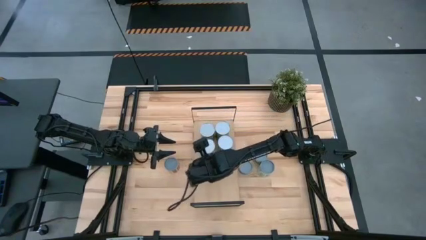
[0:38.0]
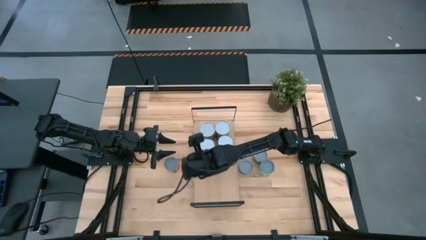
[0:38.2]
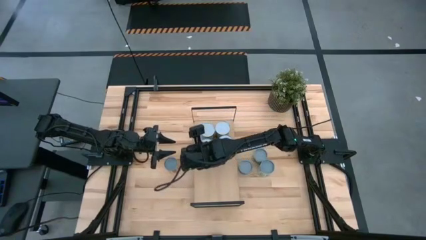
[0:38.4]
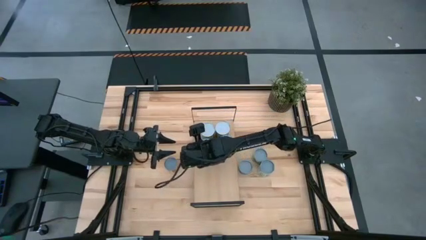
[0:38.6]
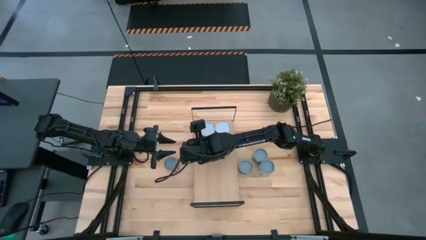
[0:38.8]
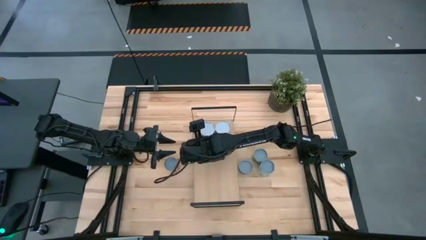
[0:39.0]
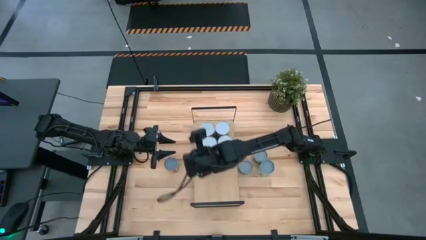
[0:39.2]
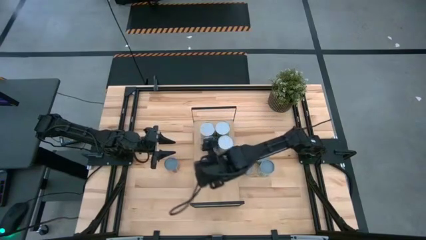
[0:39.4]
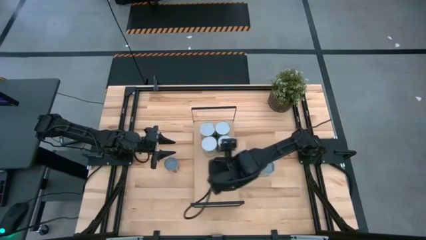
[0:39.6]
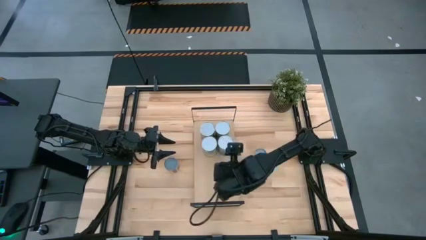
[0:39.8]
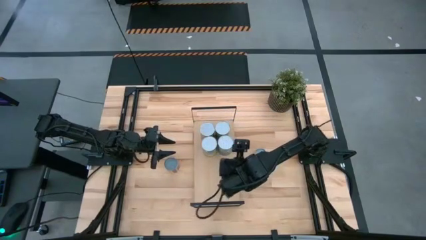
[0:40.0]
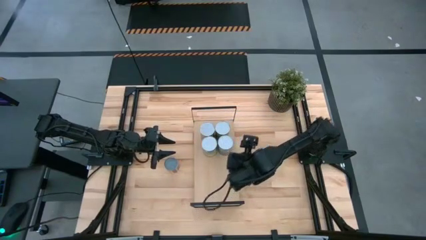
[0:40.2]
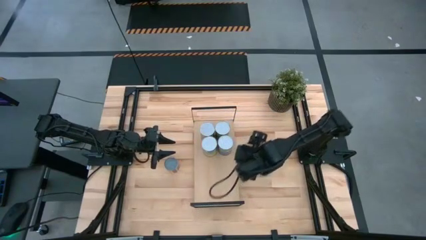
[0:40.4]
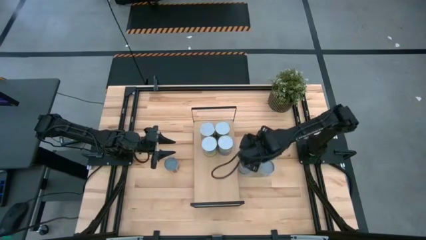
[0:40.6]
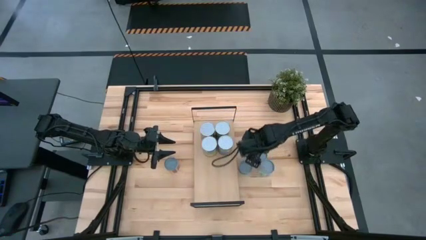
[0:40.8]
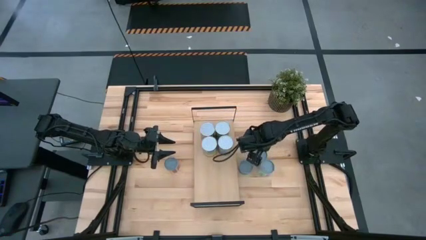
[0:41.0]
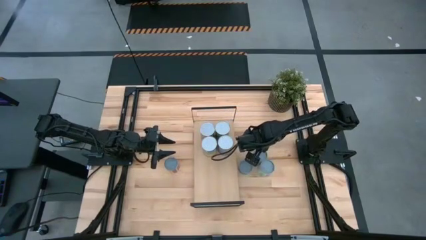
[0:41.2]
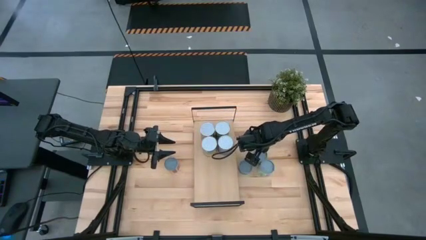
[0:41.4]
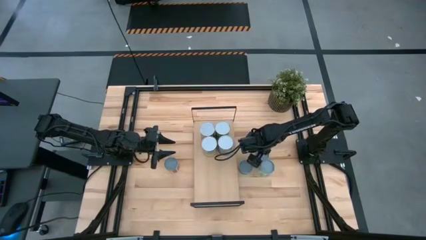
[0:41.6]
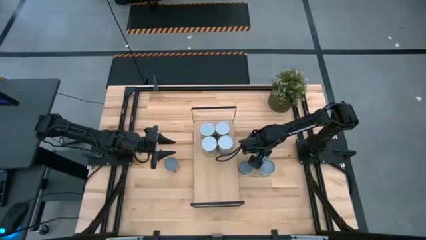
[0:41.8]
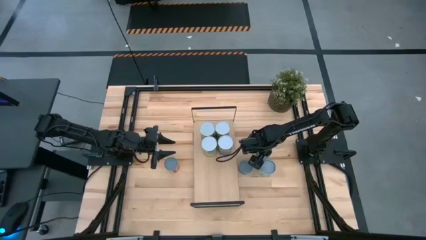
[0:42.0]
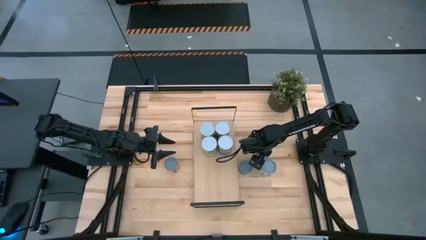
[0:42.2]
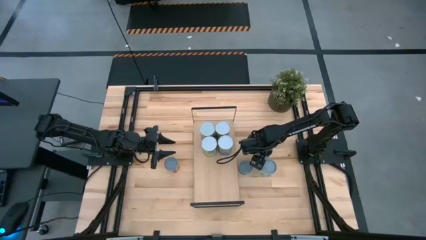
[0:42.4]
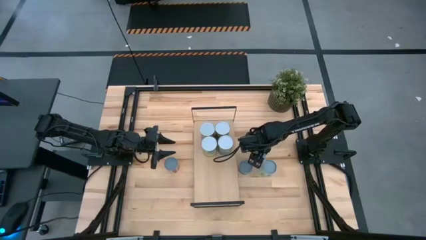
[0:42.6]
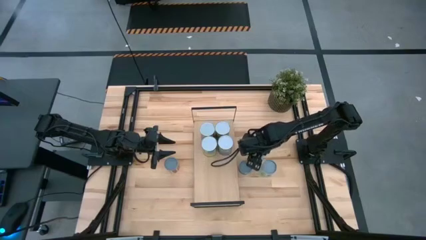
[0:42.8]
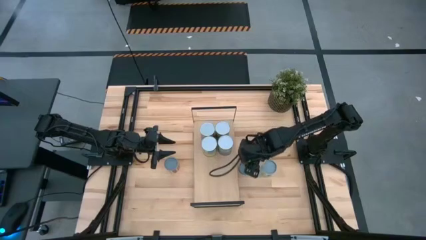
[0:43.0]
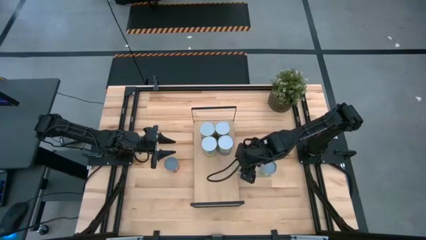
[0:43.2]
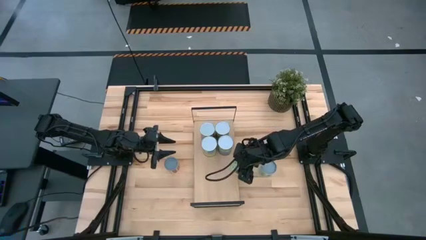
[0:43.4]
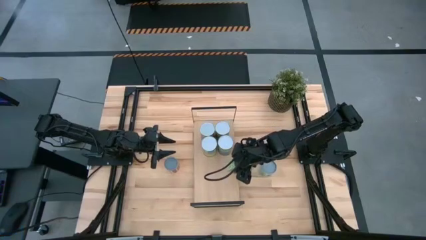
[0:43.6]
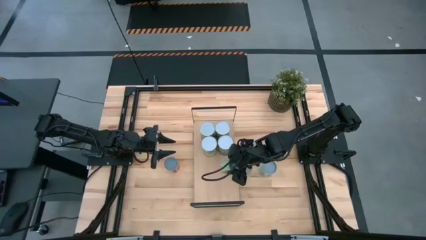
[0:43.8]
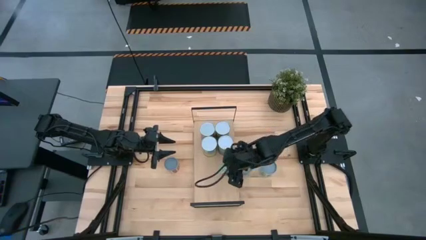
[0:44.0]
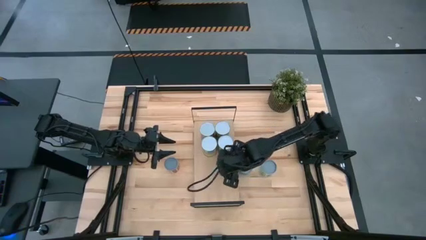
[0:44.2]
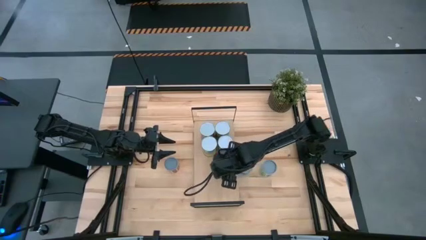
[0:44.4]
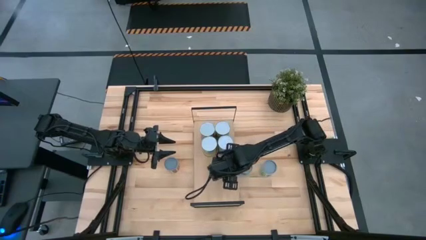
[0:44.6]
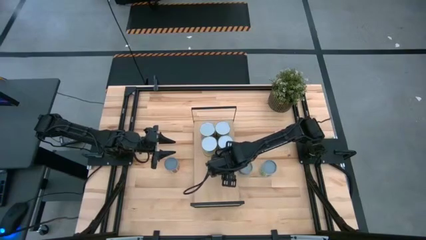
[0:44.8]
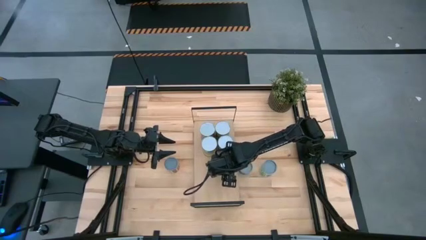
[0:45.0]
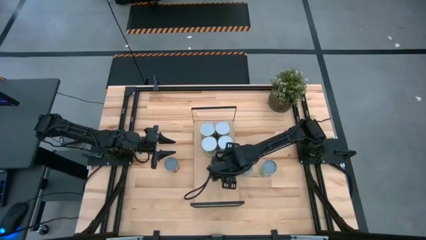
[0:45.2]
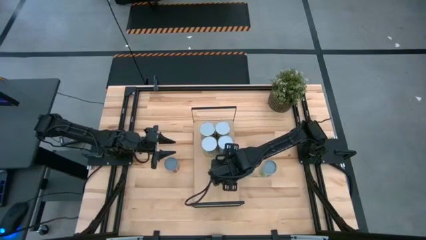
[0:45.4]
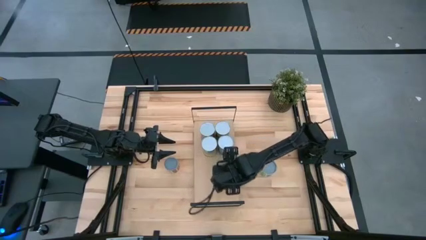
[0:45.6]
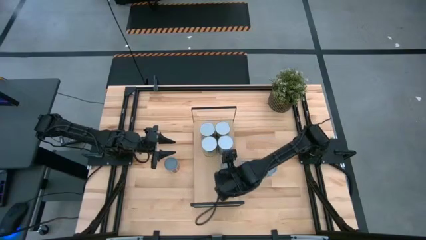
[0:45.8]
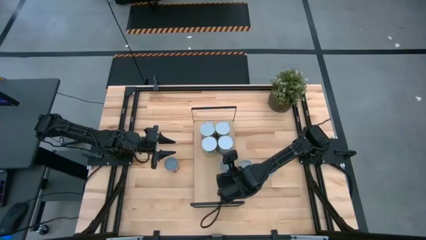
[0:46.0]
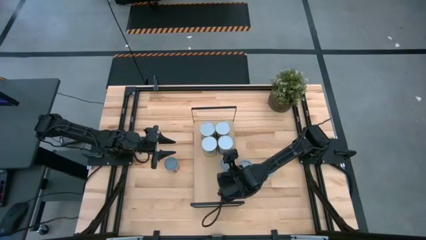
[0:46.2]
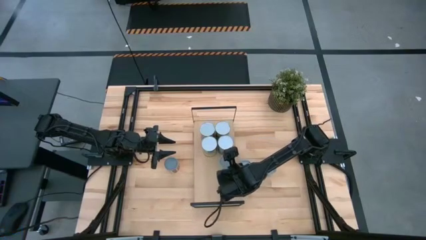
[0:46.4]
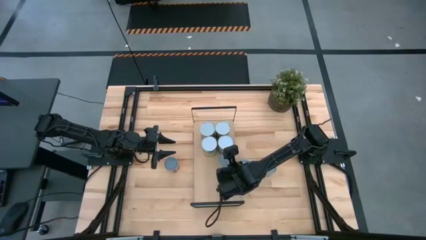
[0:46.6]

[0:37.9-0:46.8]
Task: Pick and place cans onto a shelf
Put the canned peas on the shelf

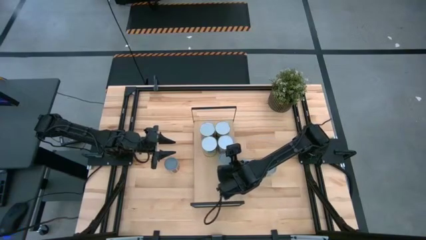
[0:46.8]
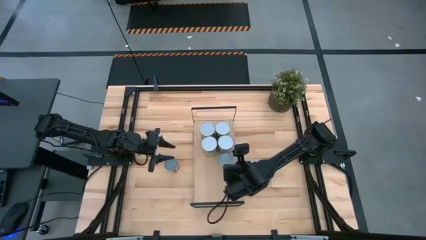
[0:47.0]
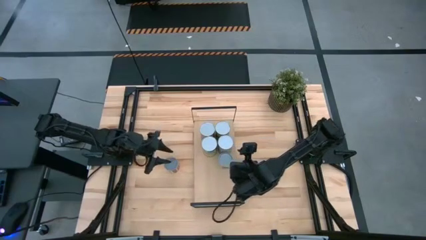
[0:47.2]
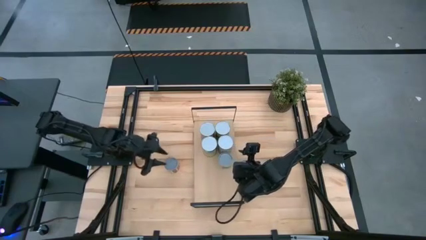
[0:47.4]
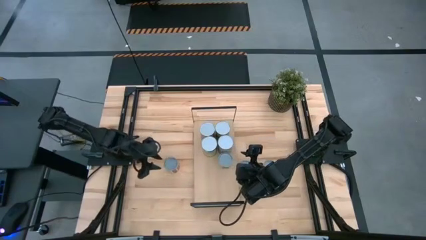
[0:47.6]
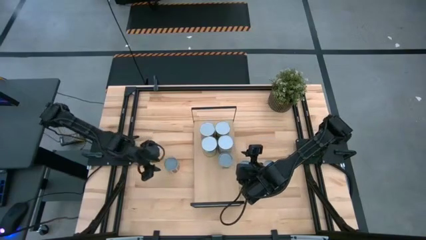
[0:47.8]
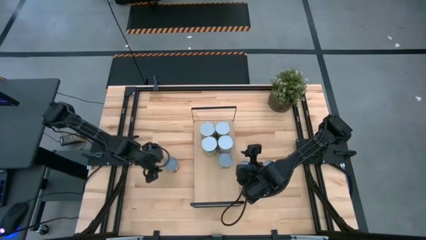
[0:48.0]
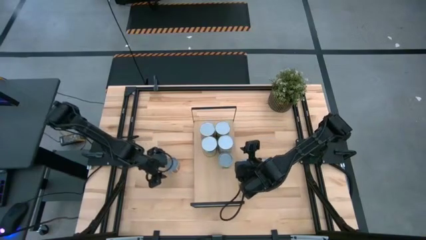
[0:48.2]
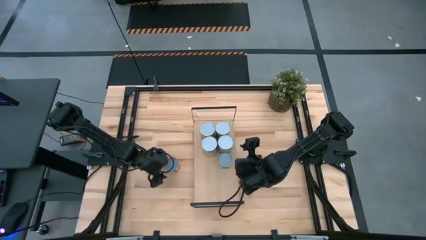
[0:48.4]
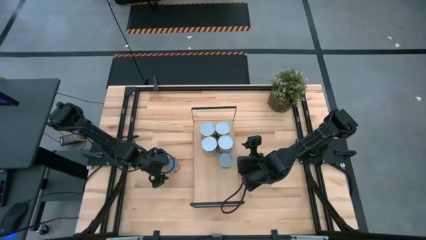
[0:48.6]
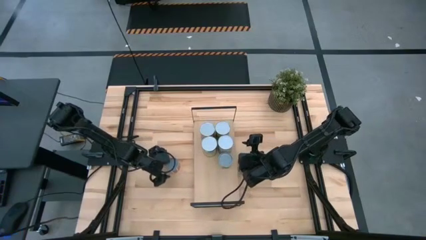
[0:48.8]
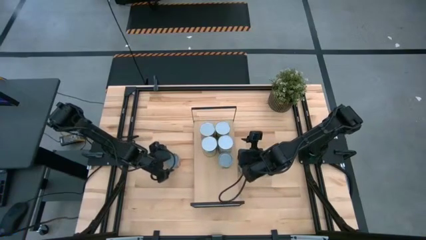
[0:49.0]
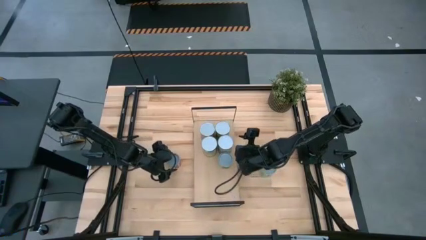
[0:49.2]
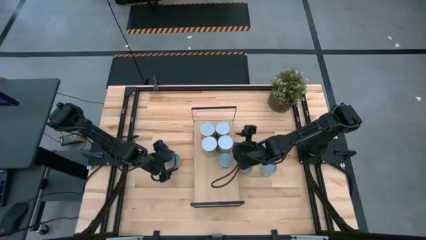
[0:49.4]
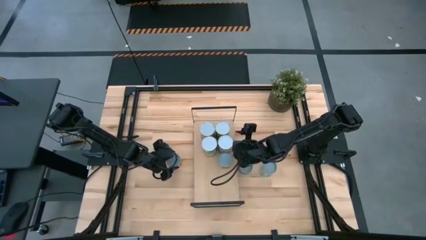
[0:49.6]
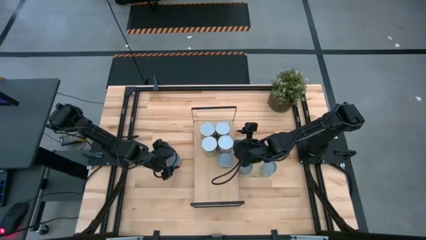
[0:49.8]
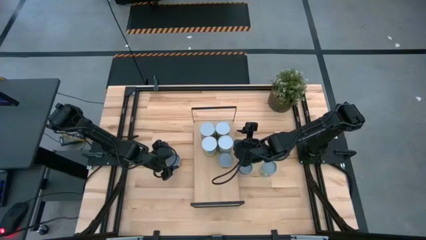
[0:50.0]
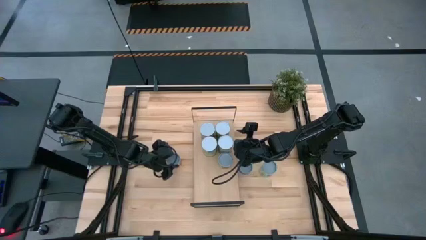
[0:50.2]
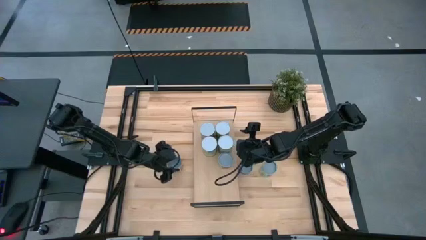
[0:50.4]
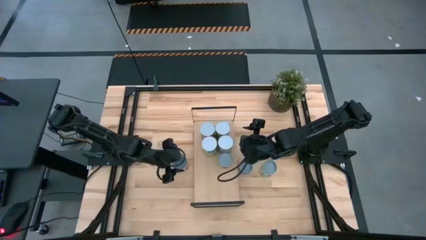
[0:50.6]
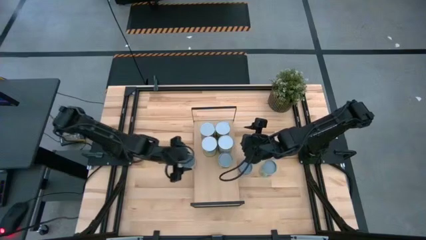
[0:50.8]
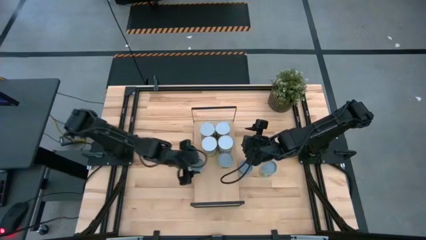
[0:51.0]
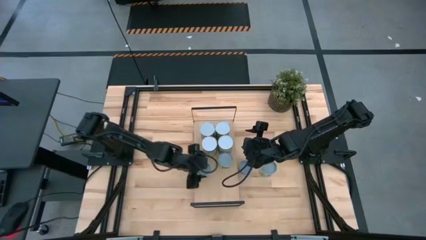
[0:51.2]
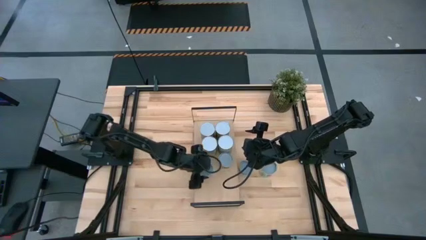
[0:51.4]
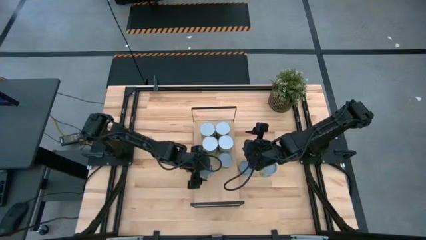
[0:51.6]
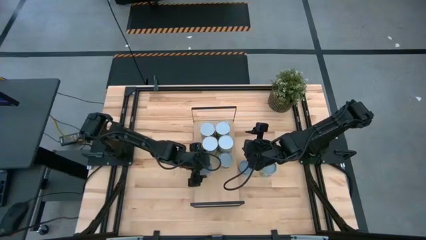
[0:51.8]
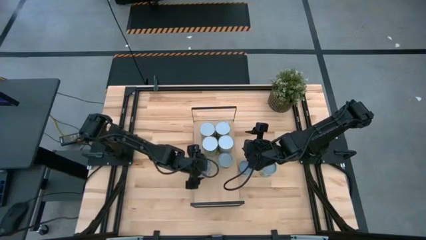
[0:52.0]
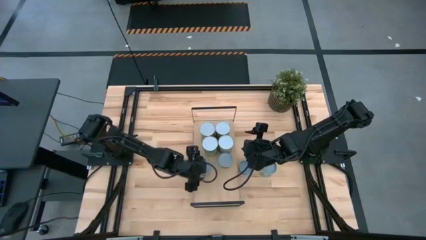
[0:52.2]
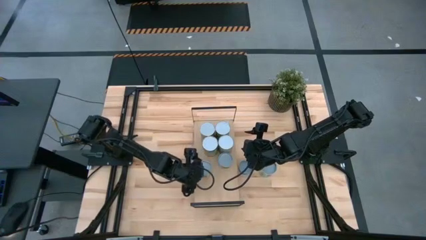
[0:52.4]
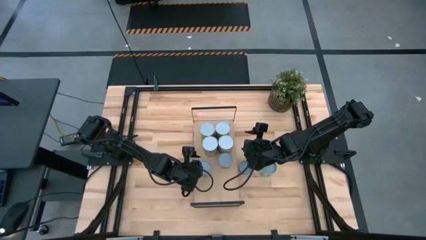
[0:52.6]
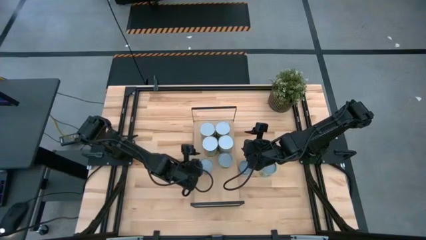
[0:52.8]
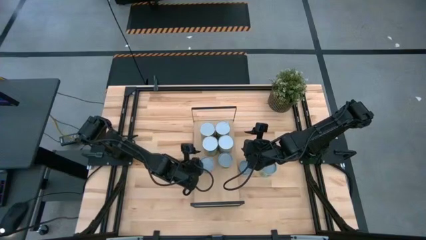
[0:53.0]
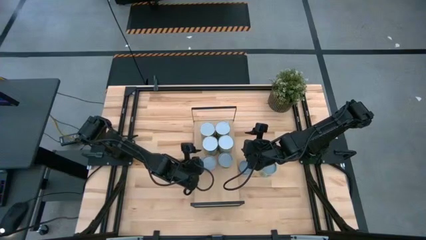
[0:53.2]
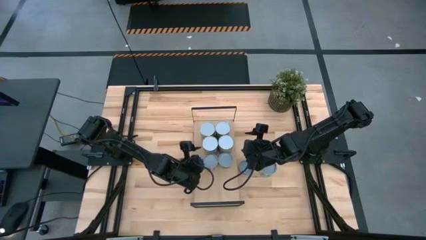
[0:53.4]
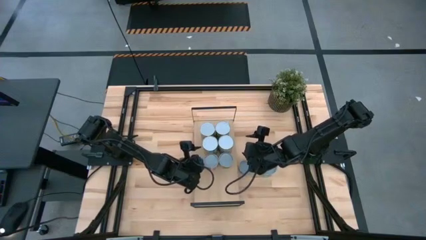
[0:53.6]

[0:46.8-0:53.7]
Put the canned diced tomatoes on the shelf
